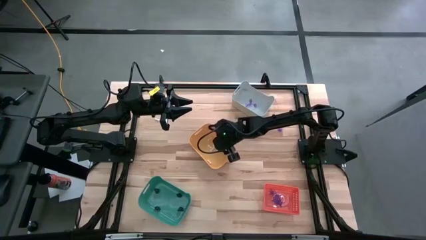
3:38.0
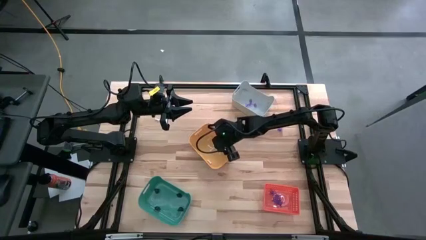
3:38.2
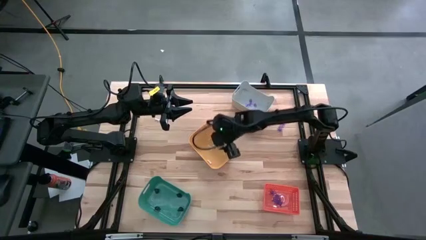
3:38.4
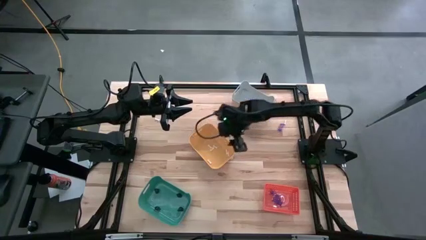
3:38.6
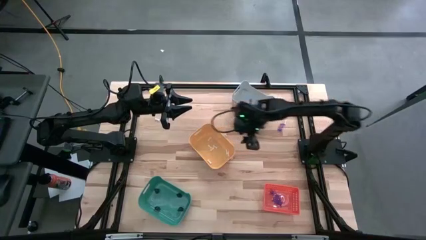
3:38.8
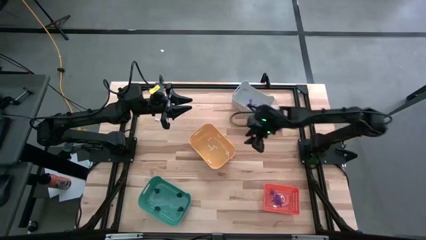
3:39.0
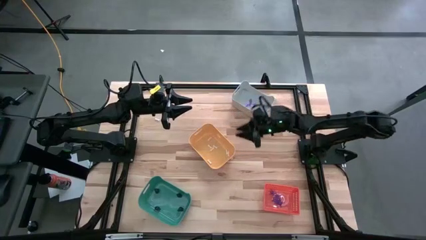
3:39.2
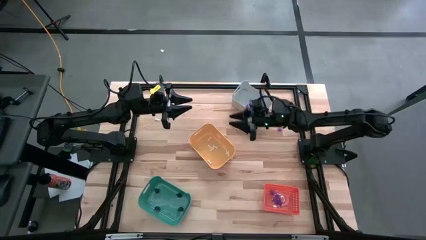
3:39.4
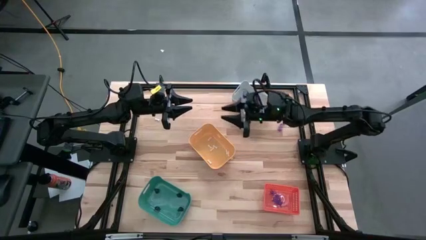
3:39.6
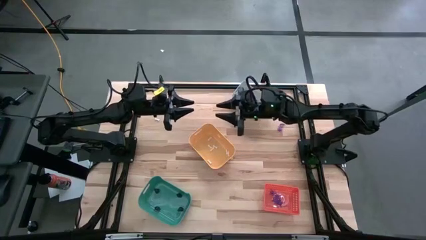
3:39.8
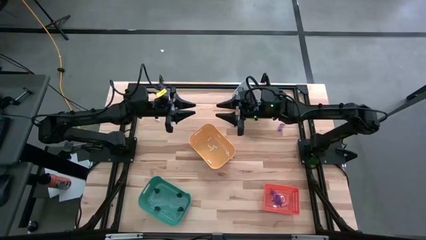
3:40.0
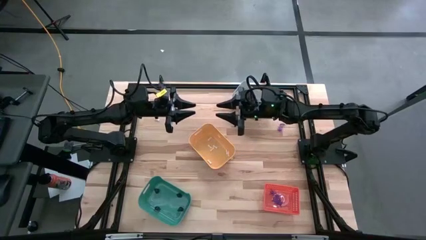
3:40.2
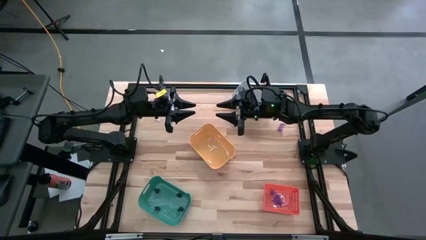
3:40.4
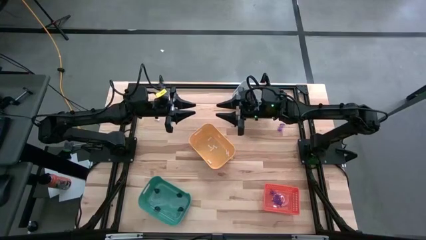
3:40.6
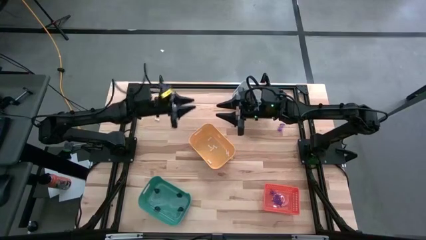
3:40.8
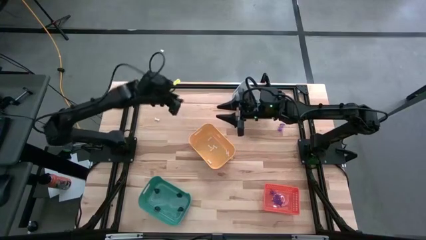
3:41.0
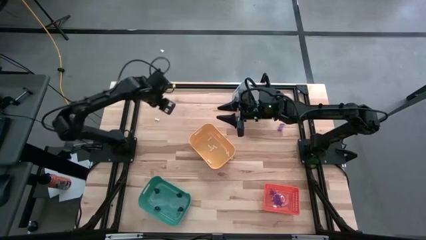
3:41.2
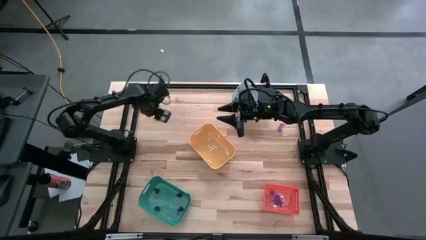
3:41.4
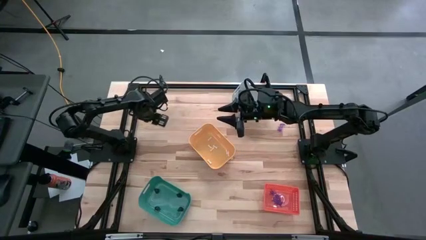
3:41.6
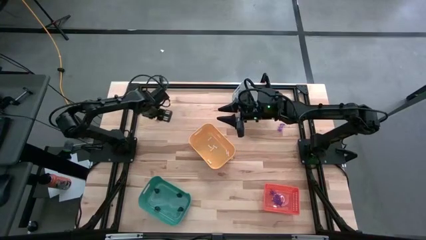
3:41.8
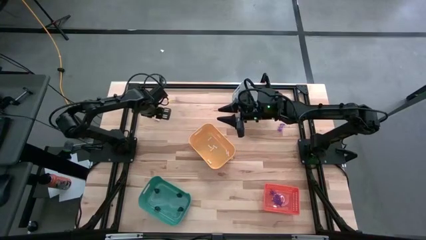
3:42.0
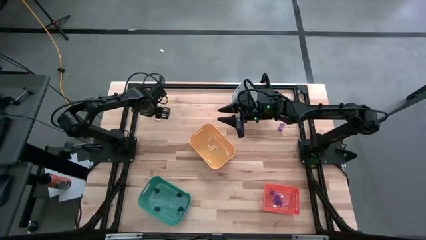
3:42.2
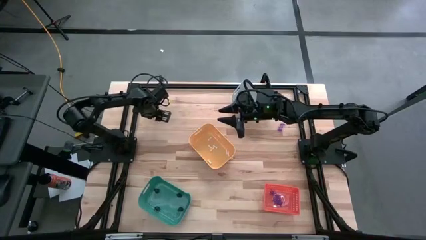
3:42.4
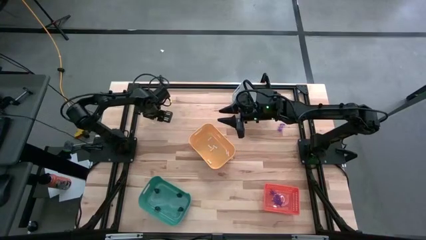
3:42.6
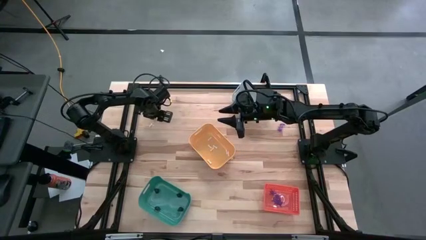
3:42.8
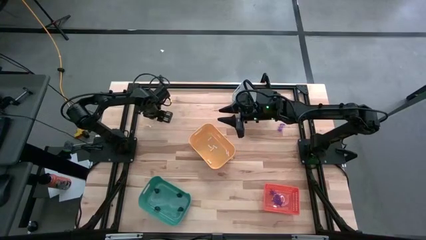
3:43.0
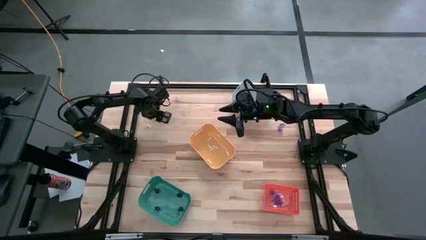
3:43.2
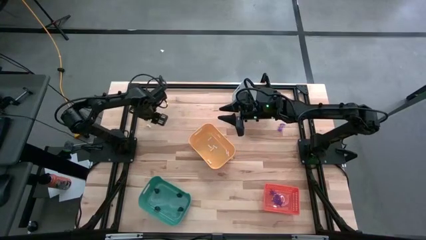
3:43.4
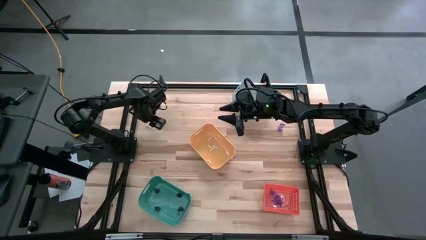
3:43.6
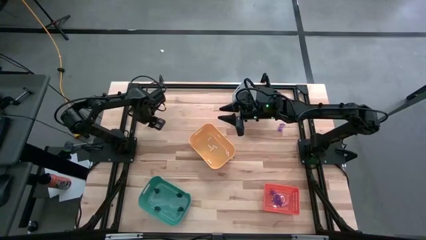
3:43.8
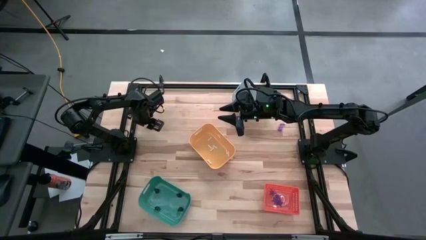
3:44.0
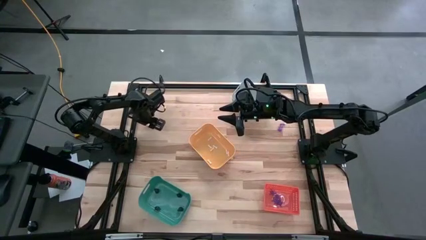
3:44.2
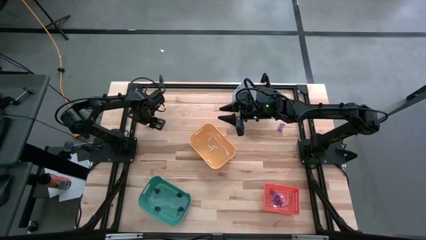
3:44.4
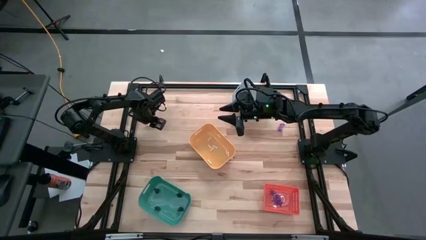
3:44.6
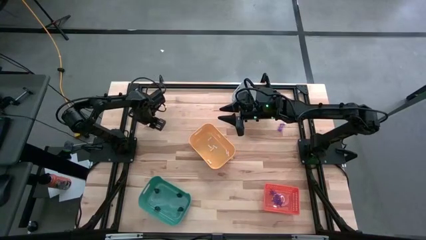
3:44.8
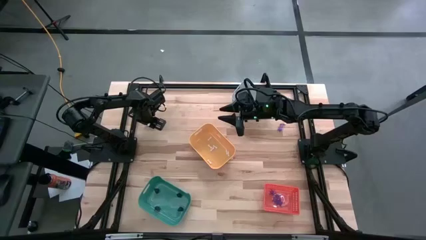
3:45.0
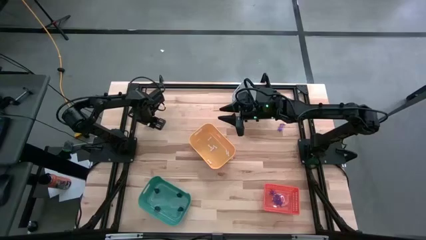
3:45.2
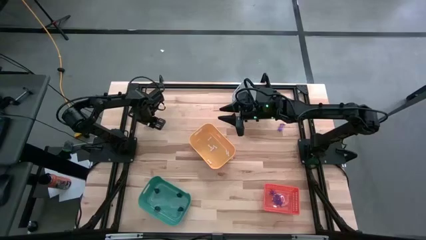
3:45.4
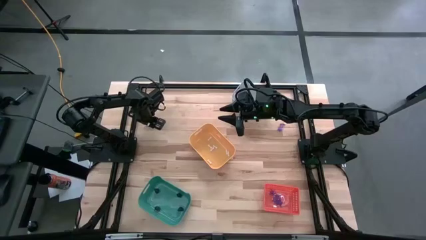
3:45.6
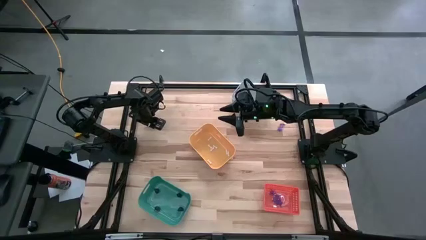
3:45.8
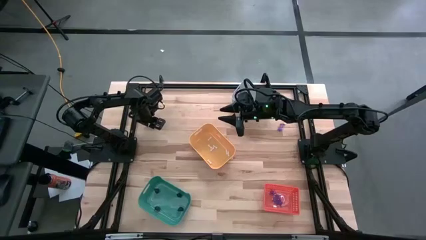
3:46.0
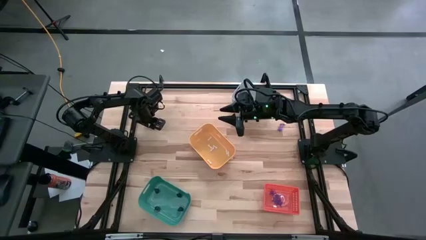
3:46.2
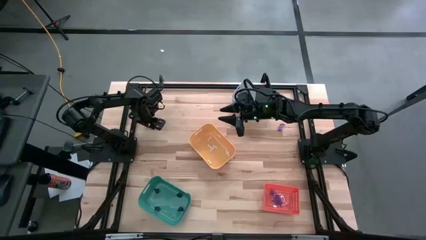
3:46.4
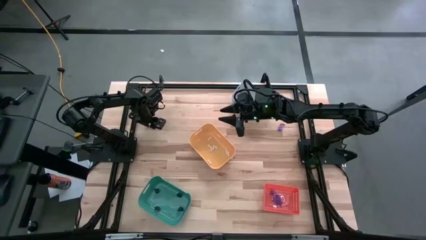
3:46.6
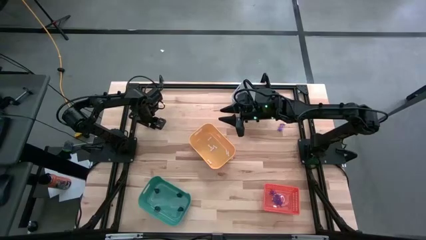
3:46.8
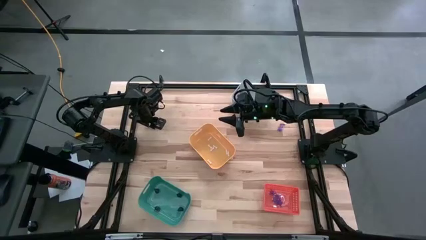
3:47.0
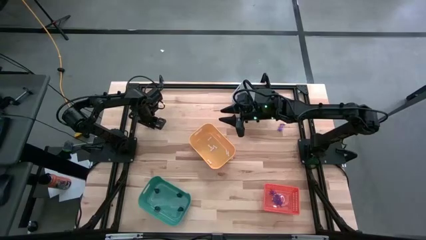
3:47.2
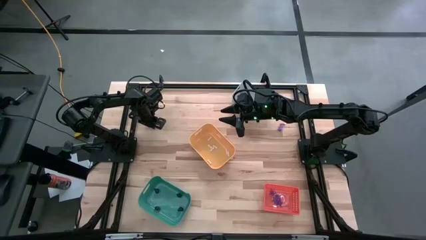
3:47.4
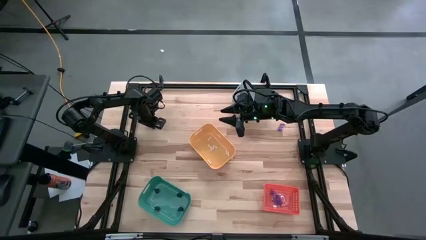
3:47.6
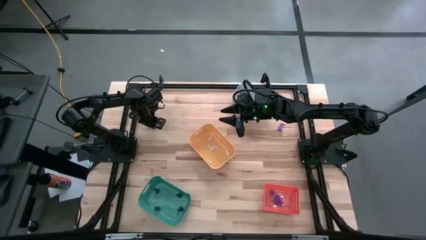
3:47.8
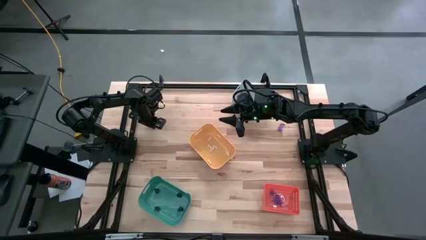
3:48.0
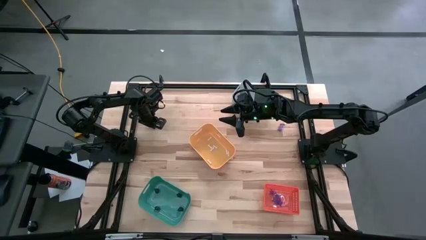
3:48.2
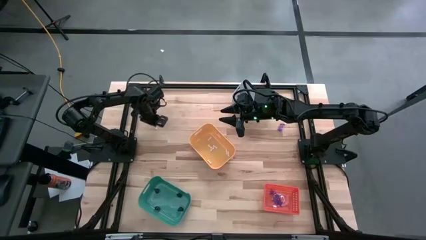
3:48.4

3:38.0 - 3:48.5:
Task: Sort Halloween decoration
Put the white bone toy into the yellow bin

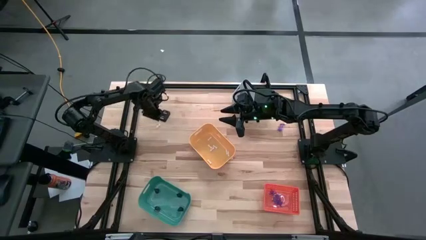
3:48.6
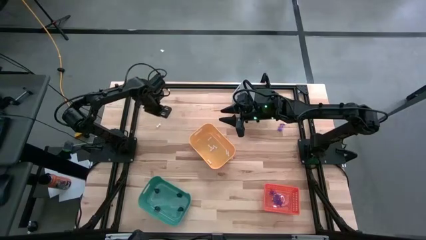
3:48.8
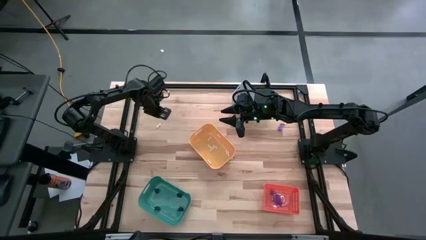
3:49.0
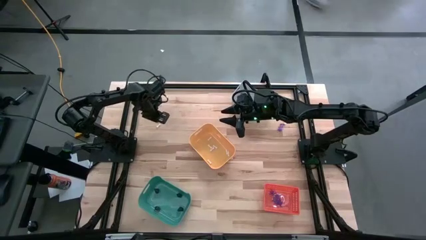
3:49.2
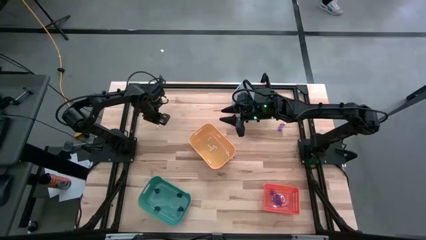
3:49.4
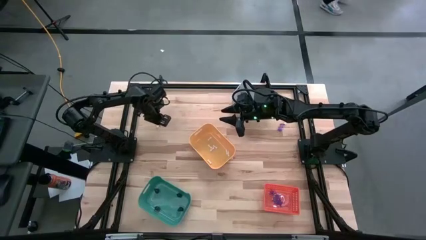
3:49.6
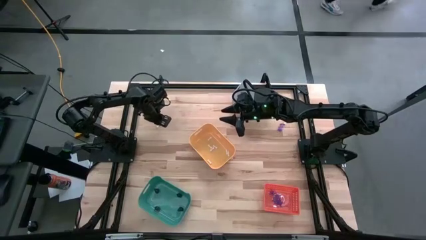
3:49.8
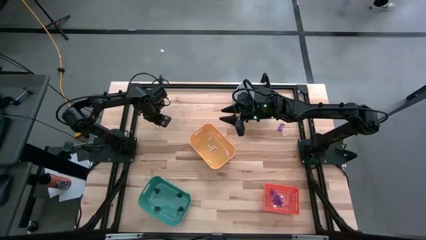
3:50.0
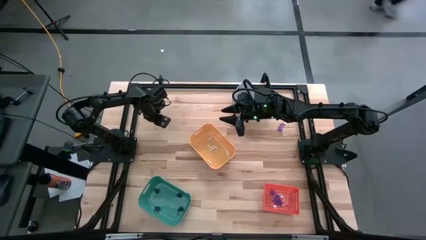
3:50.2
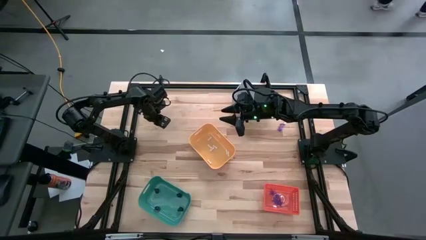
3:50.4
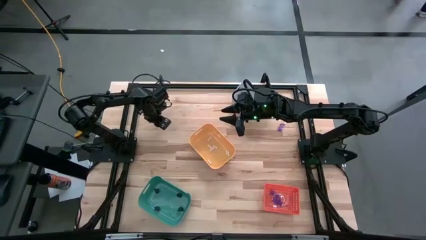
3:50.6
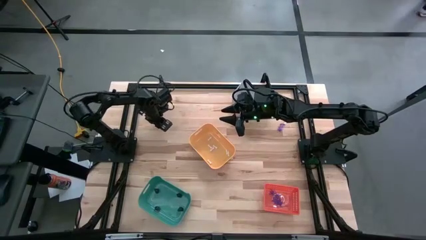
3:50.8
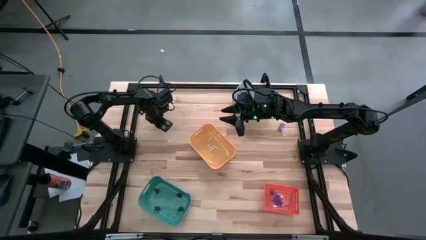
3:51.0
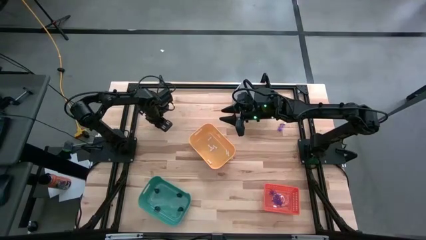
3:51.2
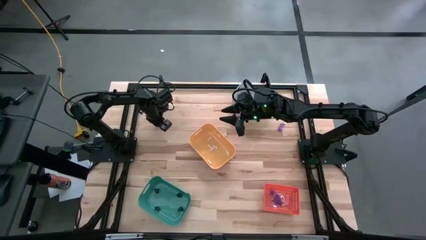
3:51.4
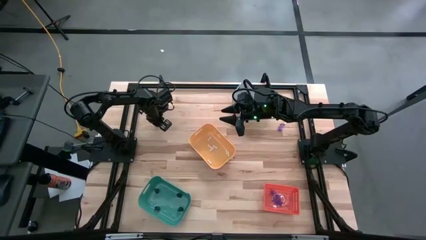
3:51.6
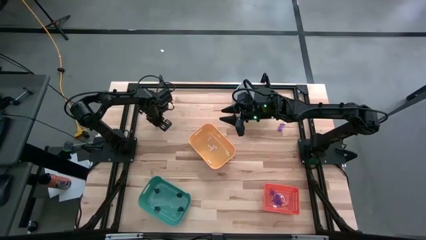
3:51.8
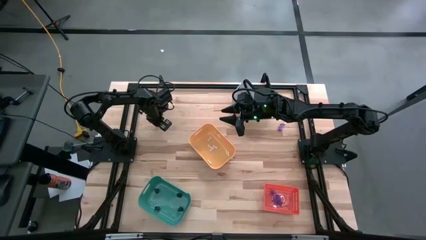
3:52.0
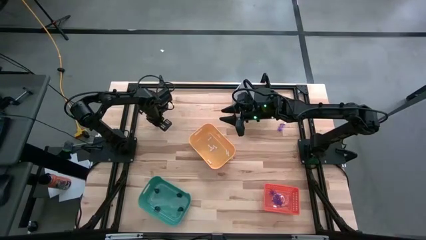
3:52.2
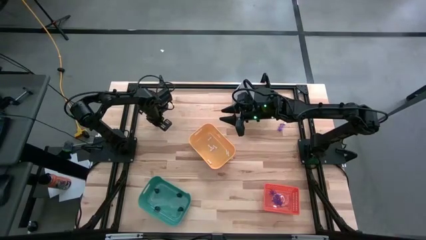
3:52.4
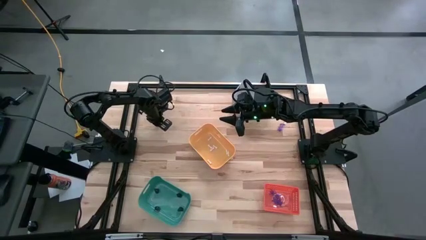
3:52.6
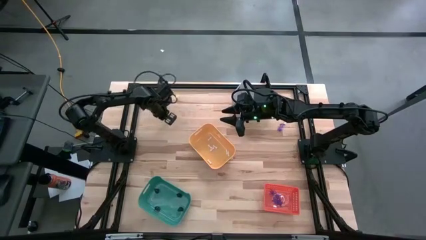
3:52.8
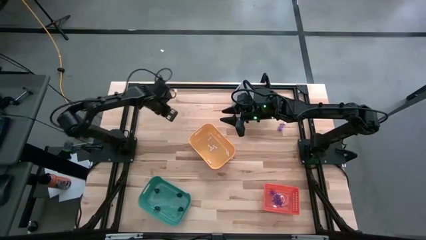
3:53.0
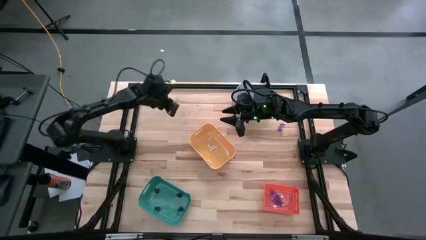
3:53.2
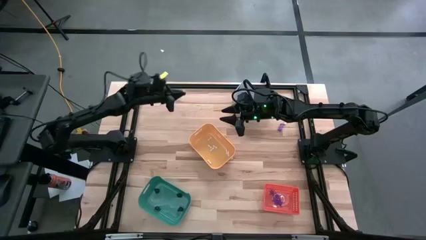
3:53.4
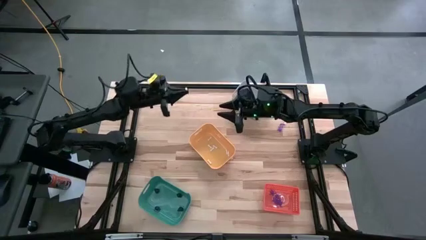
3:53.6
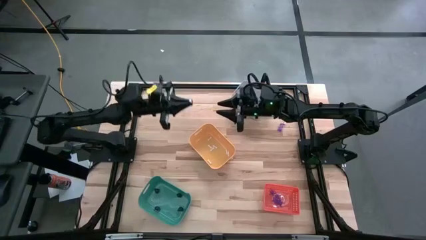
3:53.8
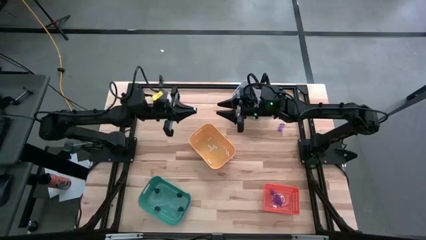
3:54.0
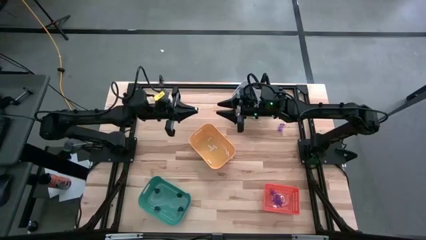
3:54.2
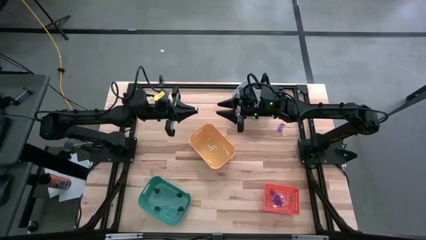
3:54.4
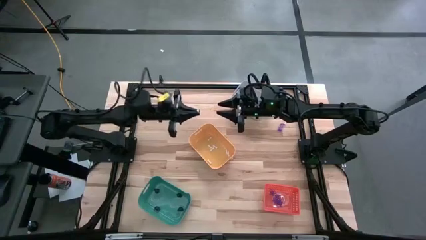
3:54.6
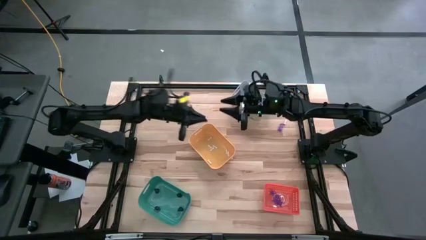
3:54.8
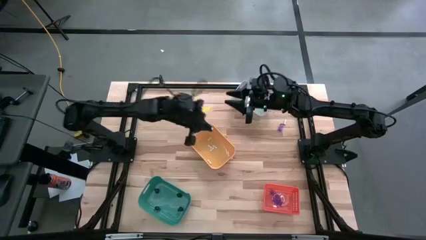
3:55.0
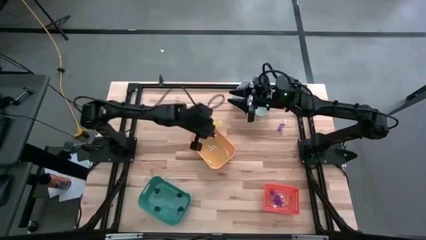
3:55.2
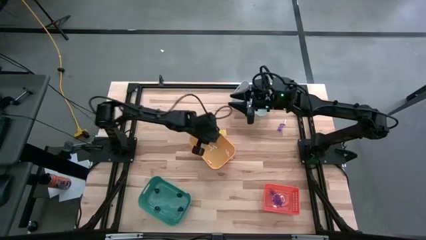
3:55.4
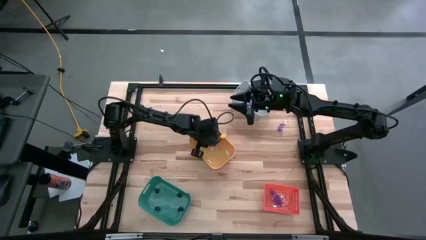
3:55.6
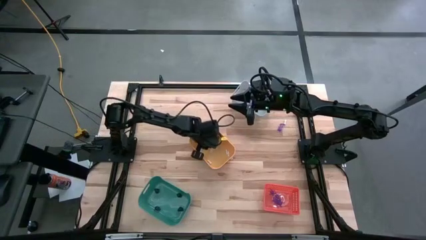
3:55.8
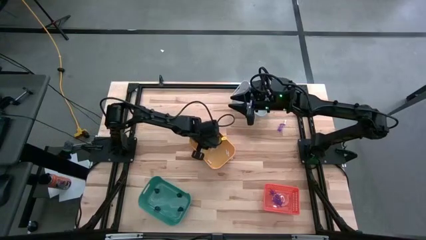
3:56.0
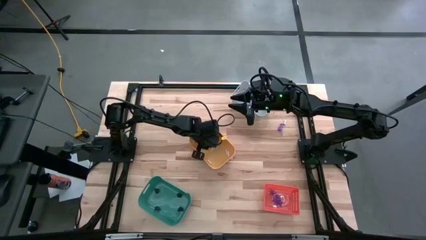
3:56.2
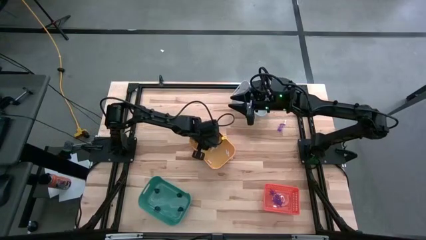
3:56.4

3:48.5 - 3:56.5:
Put the white bone toy into the yellow bin
